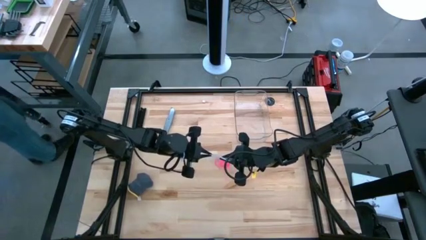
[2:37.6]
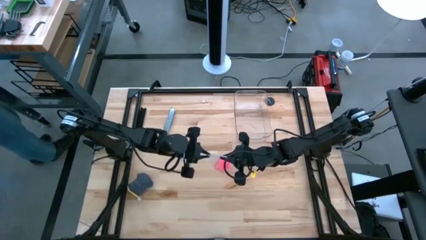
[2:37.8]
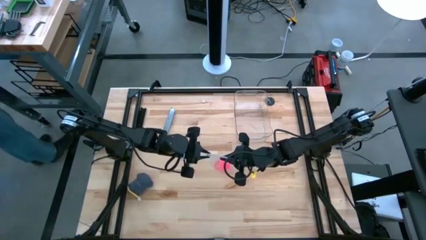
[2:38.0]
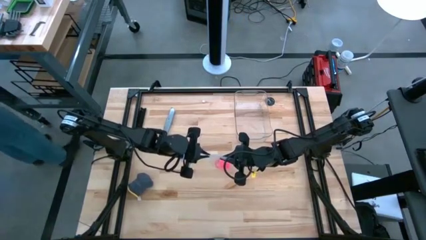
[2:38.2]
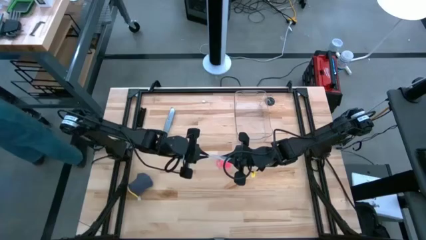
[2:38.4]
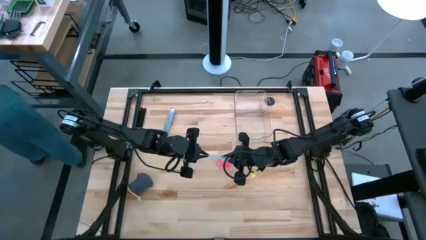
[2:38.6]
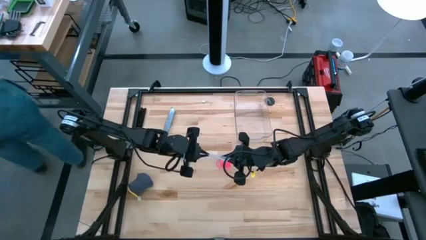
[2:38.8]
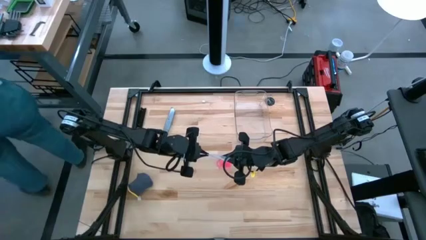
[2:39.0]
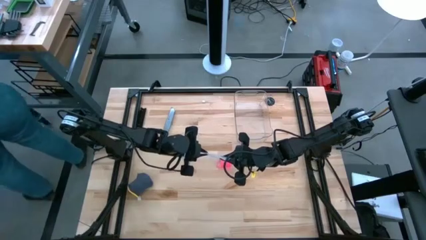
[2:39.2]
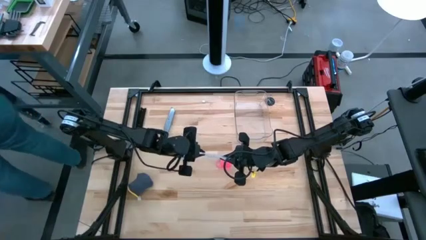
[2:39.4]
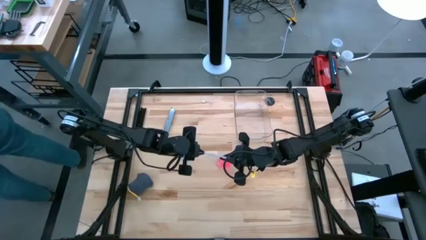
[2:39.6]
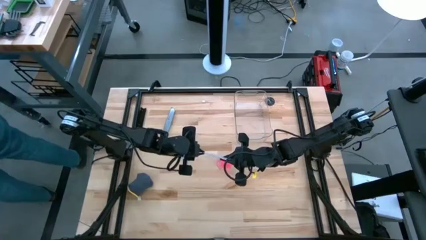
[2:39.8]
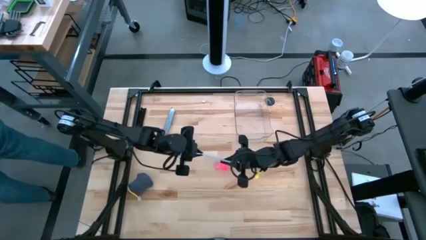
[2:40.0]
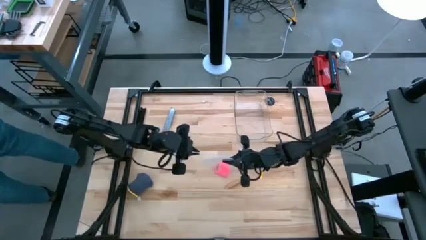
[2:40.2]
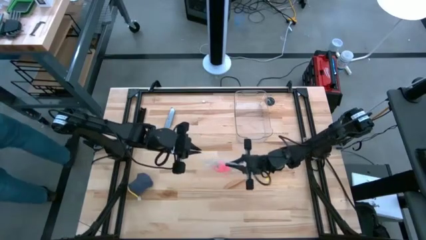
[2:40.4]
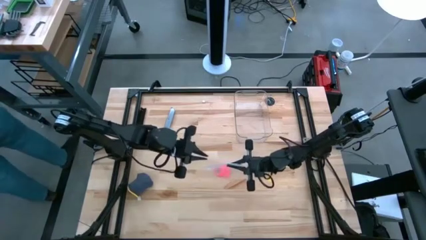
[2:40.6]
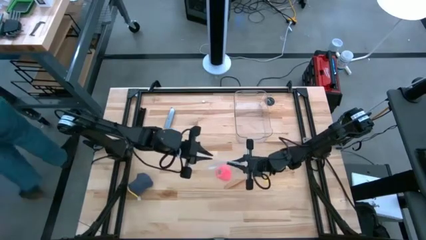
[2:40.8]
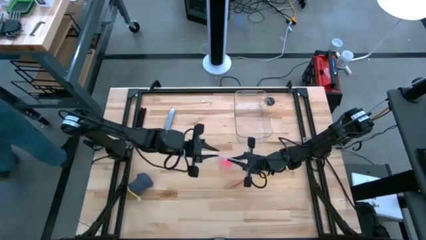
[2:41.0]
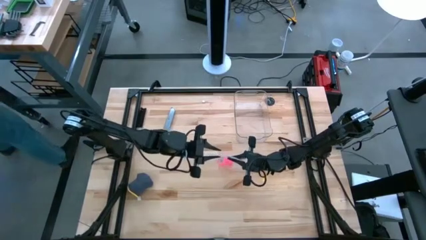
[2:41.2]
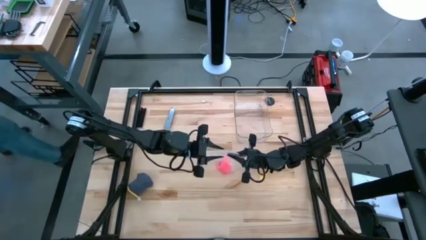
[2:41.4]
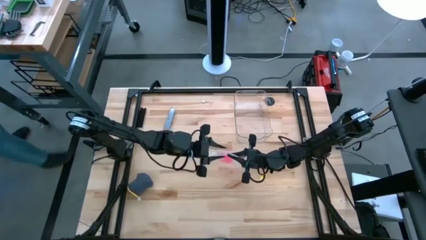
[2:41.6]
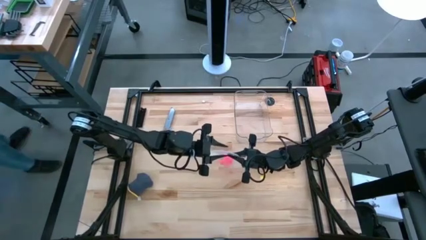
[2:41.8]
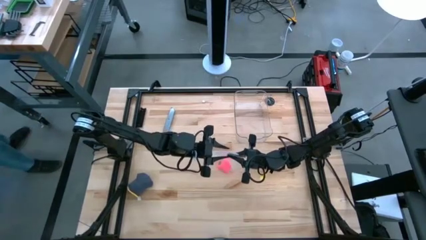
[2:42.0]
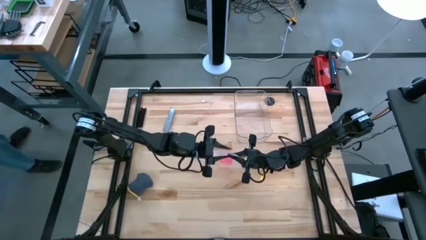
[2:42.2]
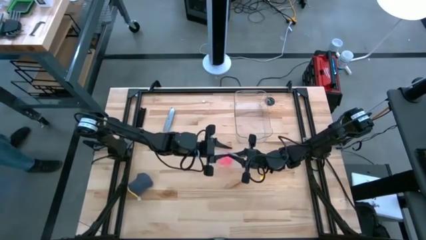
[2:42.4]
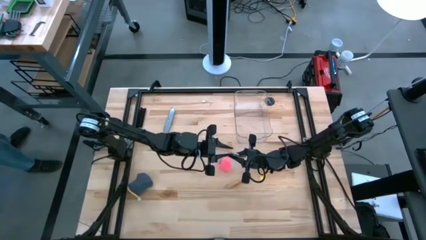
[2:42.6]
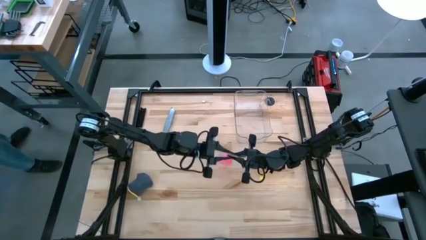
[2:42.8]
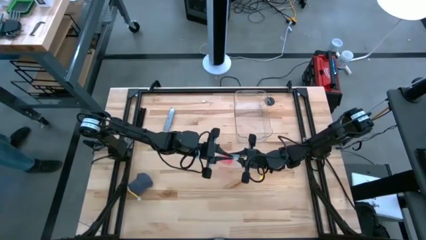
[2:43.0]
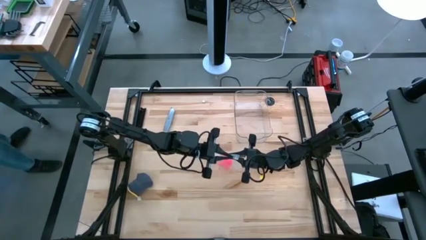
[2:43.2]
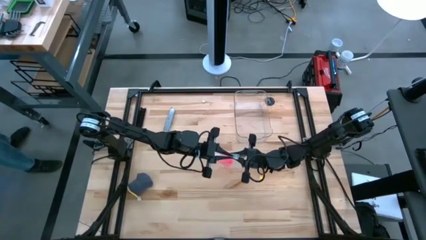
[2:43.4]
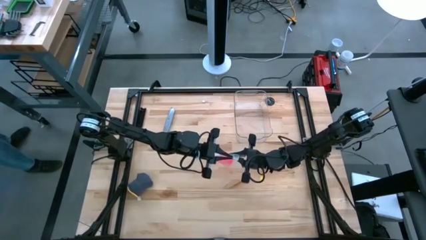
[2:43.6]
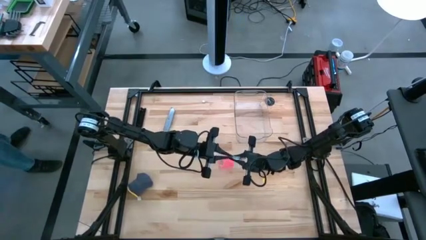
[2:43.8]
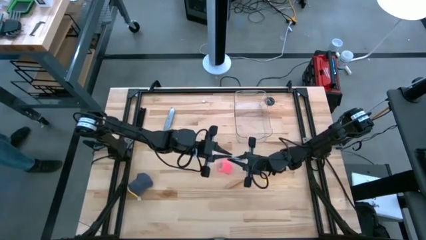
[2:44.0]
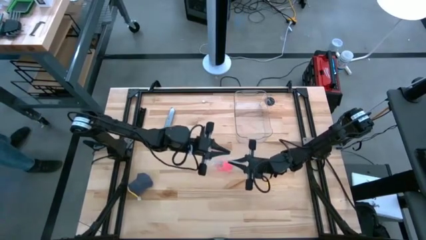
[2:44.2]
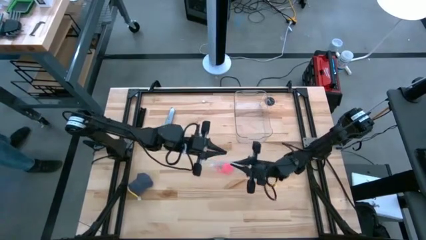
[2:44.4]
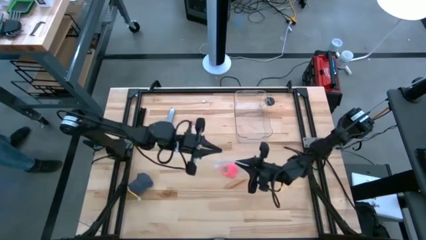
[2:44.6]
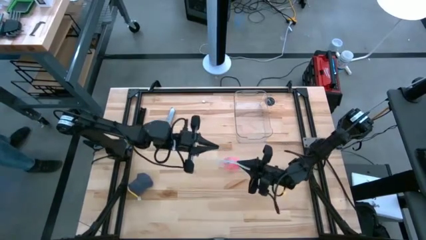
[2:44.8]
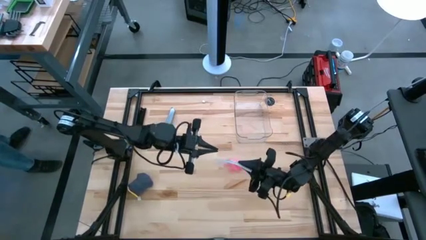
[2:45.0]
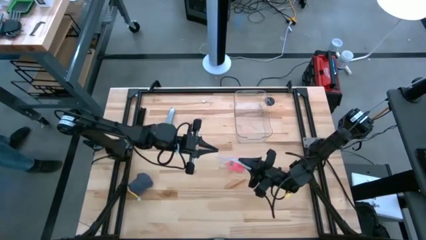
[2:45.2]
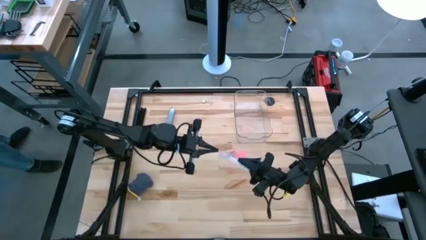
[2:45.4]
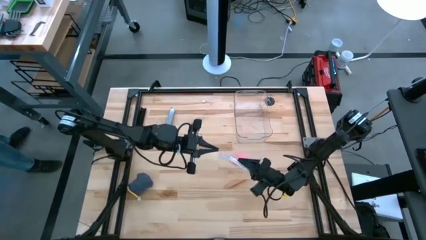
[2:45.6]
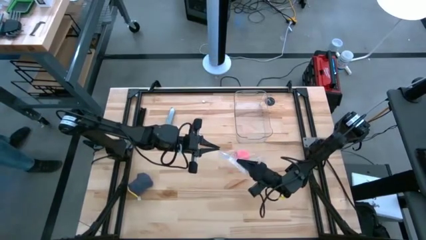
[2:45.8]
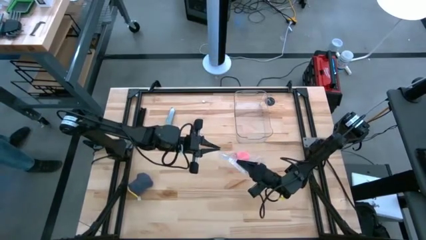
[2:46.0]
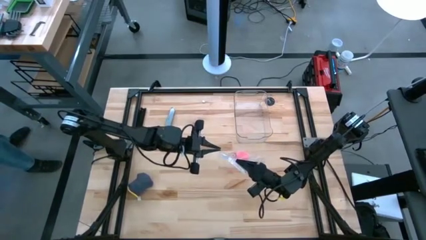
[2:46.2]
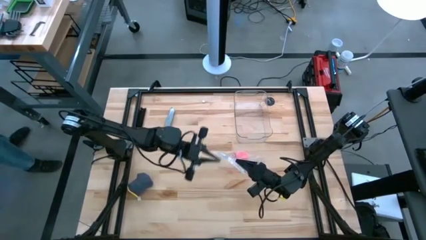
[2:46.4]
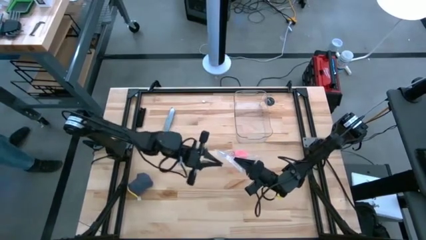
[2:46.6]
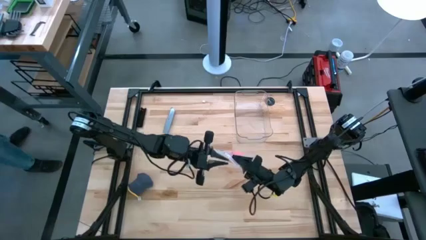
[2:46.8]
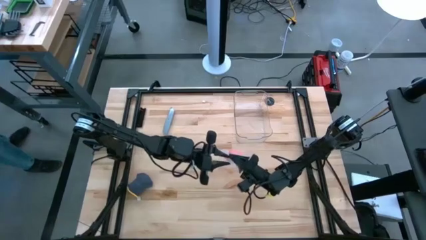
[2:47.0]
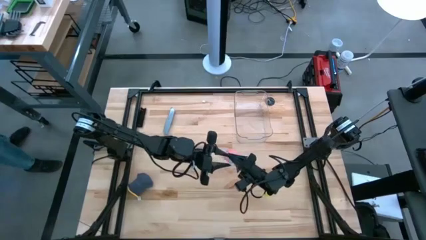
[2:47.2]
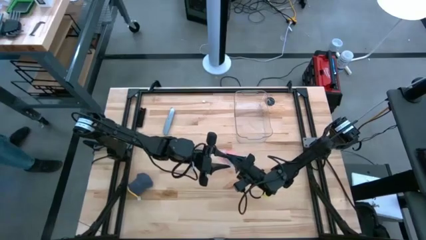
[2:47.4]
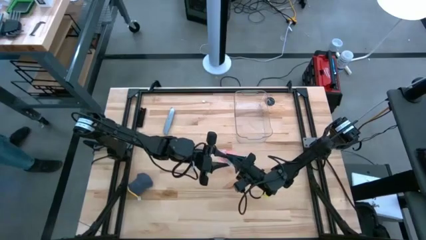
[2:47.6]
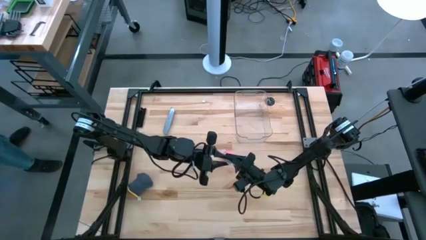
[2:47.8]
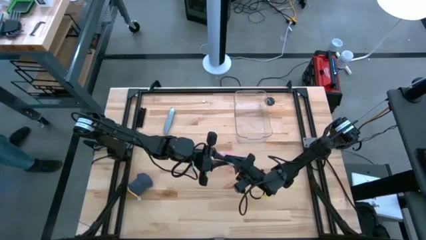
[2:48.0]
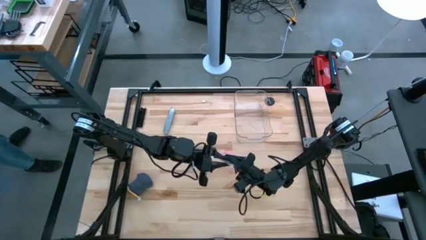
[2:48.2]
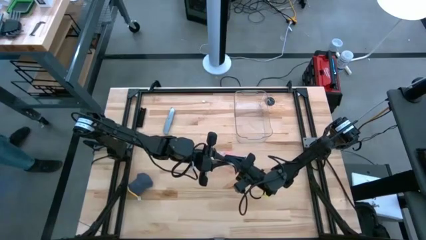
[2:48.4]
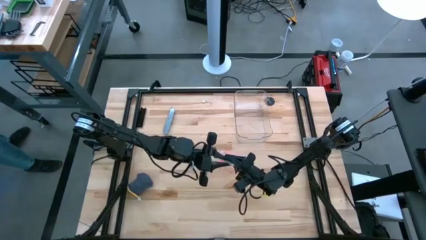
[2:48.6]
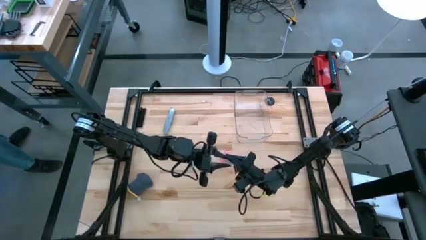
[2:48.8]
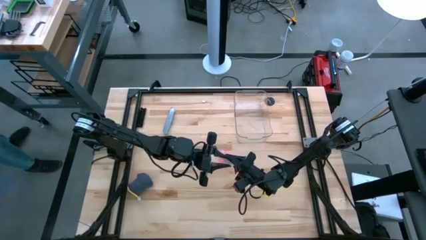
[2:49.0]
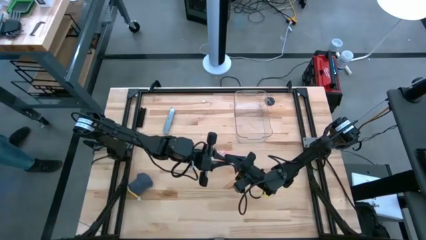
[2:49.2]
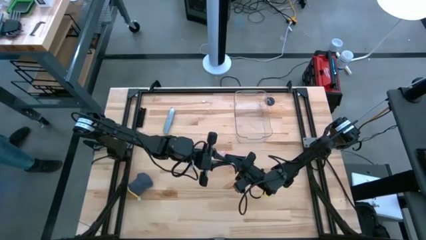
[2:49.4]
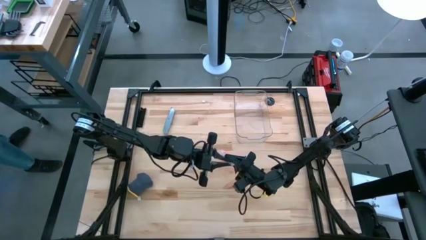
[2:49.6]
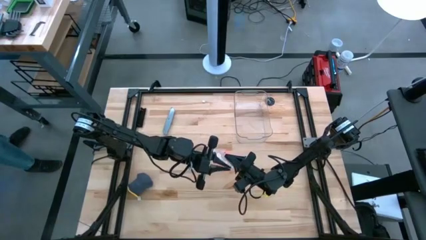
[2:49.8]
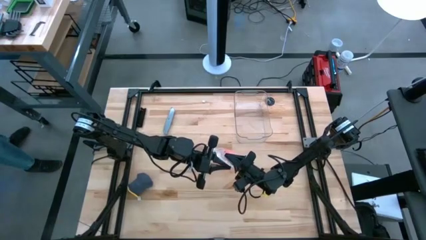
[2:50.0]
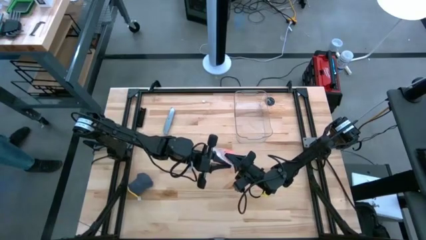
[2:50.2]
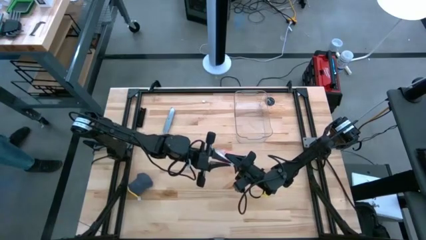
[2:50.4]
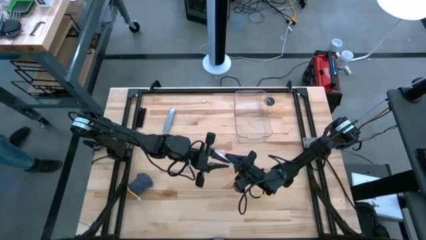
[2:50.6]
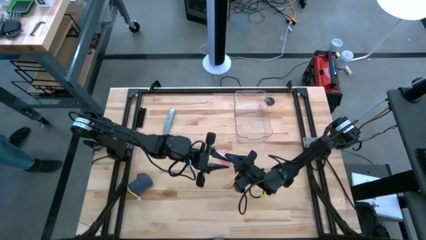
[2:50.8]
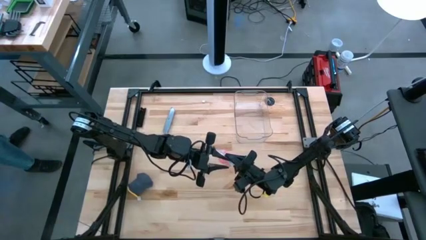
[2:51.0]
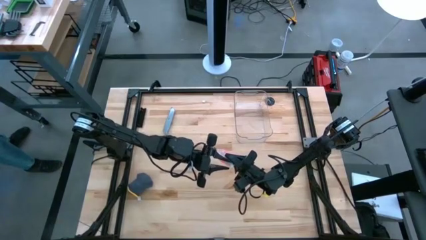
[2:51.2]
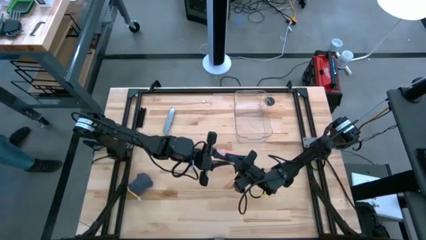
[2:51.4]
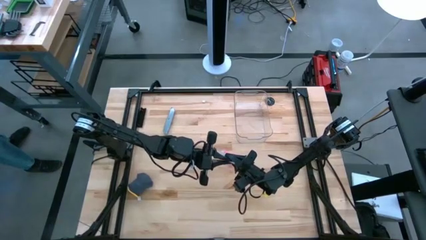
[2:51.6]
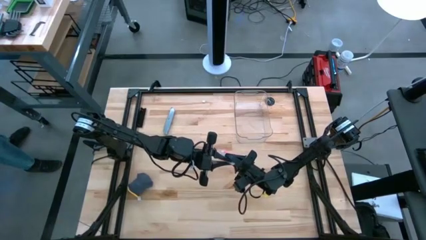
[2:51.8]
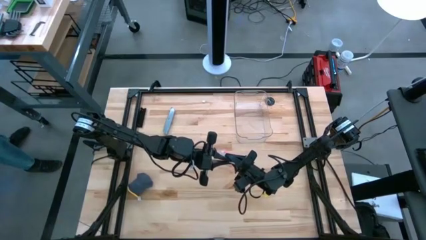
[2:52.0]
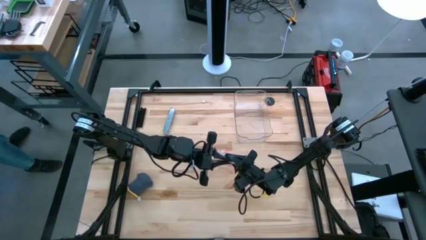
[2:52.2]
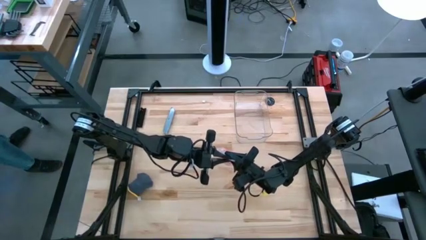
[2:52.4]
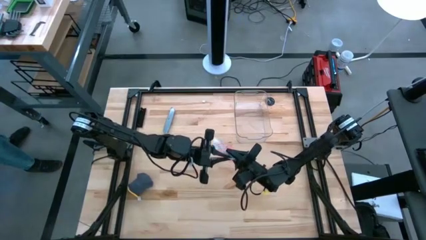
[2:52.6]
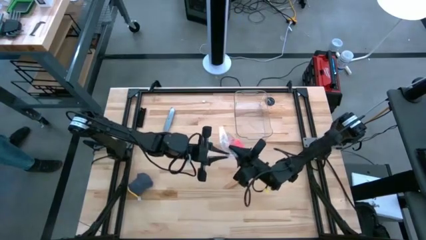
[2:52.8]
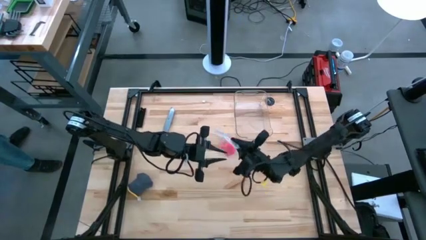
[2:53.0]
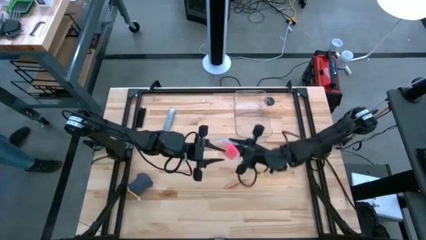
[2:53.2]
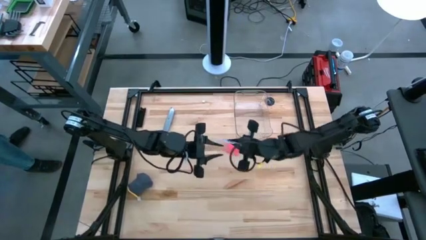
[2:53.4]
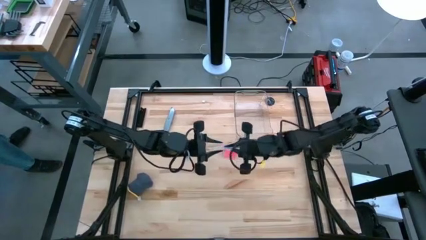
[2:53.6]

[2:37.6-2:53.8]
Task: Roll bandage
Close the transparent zip bag
